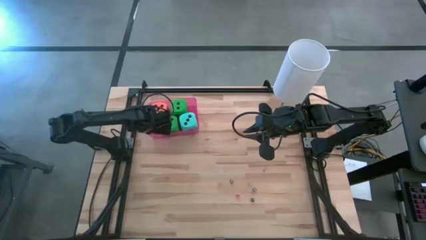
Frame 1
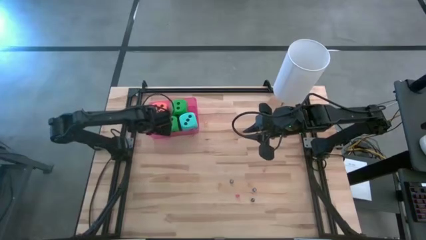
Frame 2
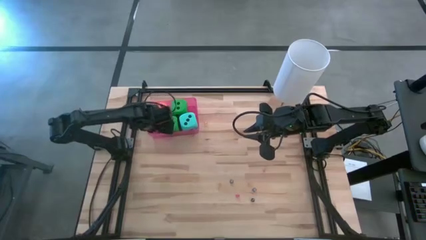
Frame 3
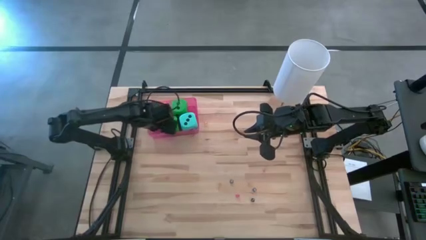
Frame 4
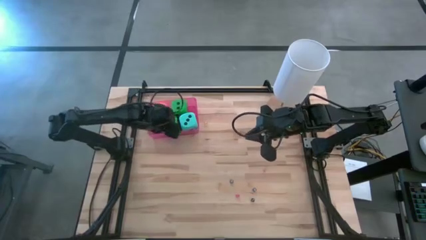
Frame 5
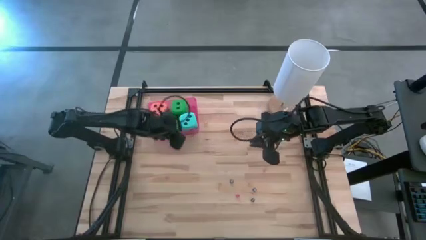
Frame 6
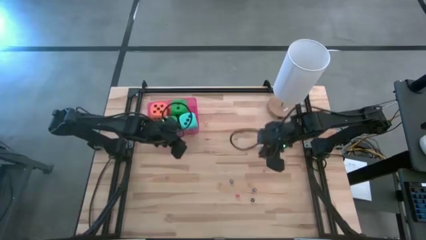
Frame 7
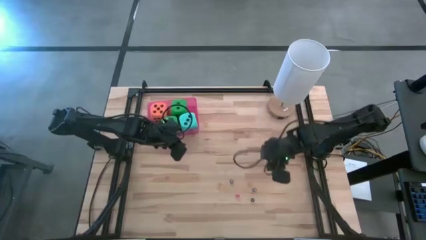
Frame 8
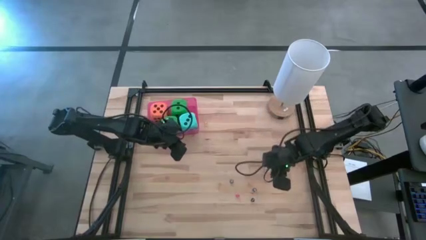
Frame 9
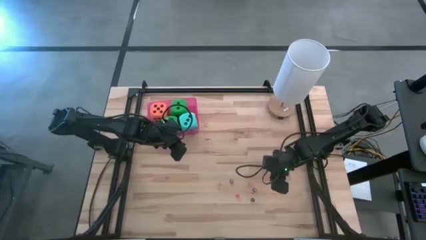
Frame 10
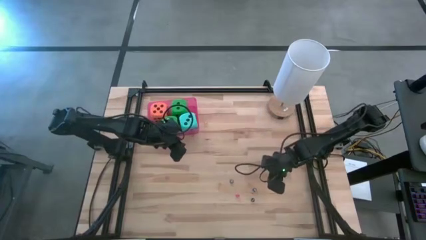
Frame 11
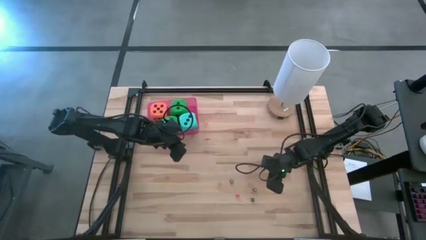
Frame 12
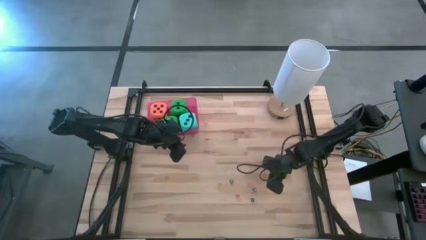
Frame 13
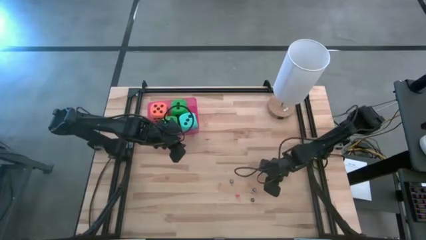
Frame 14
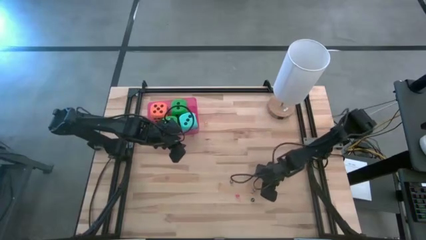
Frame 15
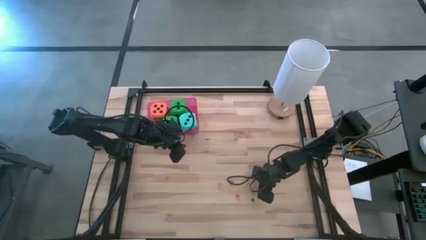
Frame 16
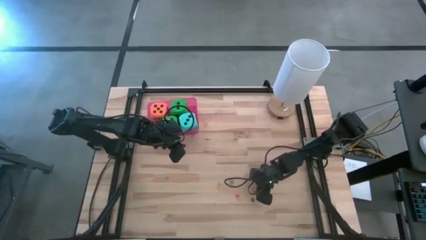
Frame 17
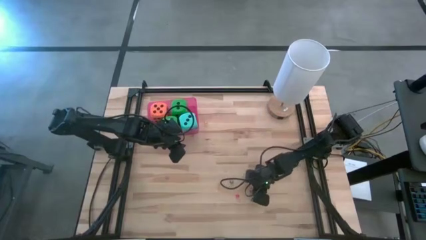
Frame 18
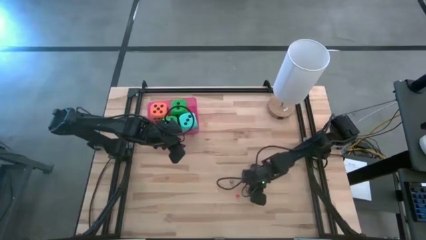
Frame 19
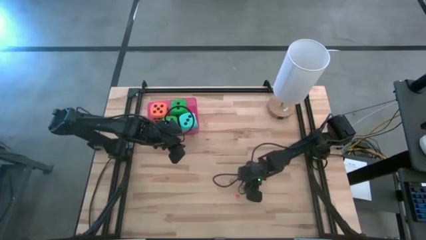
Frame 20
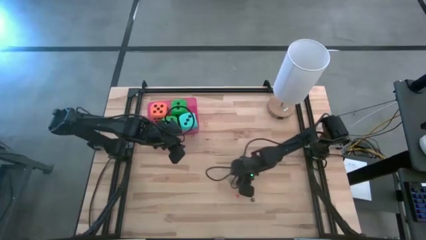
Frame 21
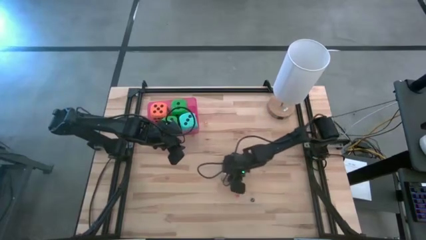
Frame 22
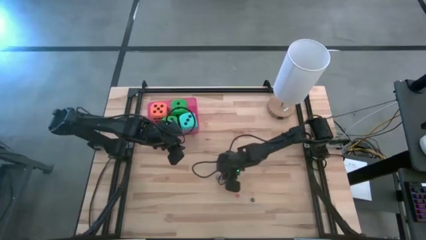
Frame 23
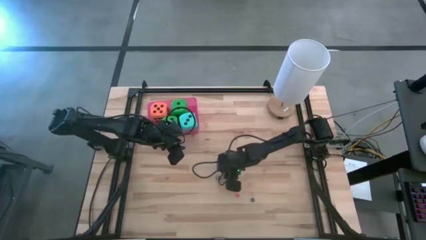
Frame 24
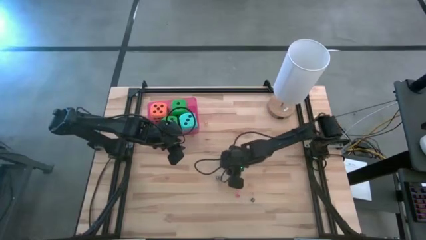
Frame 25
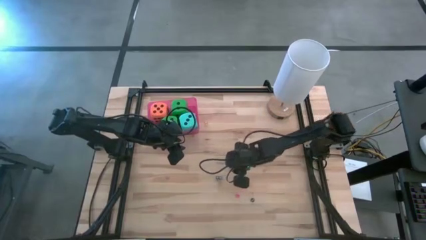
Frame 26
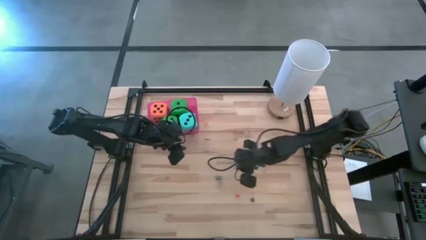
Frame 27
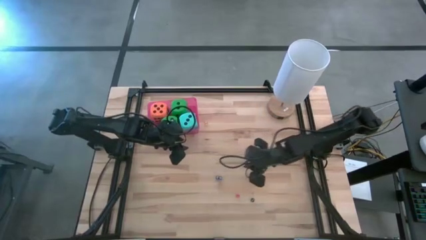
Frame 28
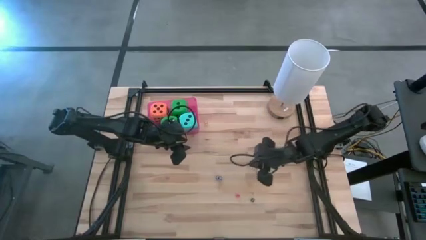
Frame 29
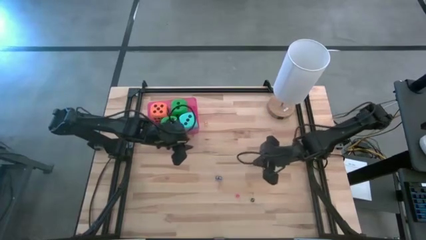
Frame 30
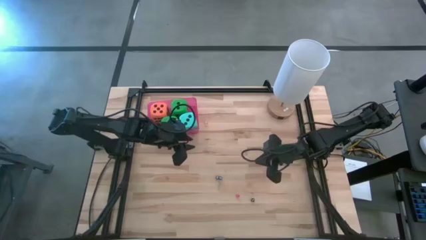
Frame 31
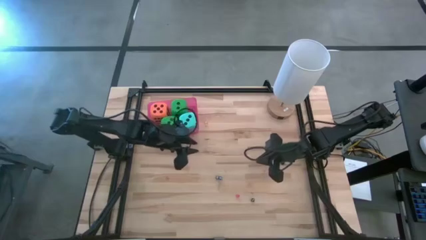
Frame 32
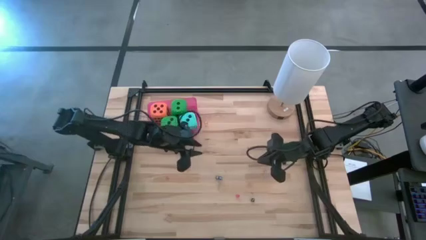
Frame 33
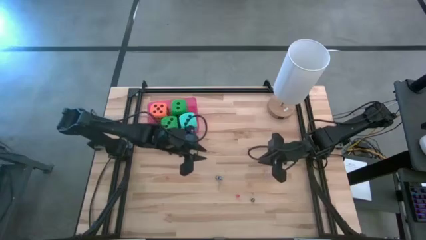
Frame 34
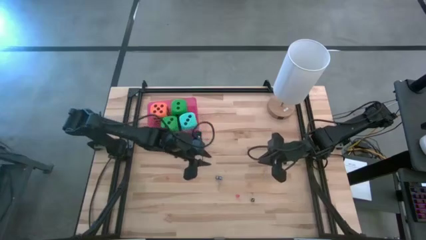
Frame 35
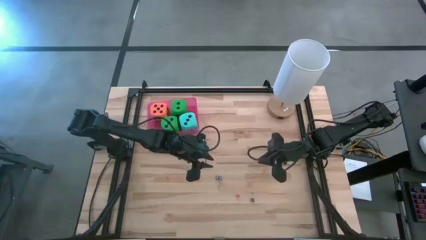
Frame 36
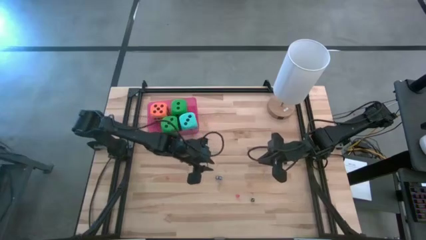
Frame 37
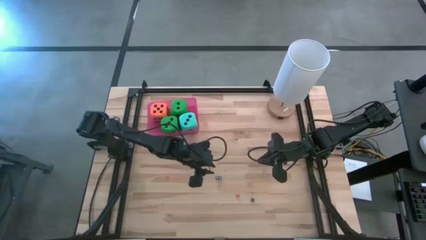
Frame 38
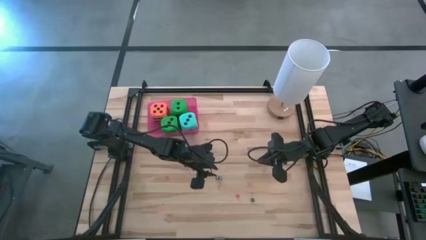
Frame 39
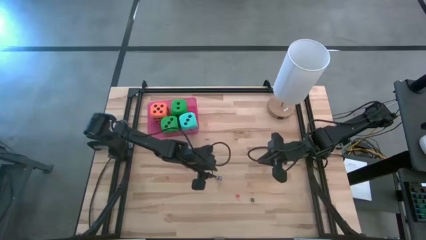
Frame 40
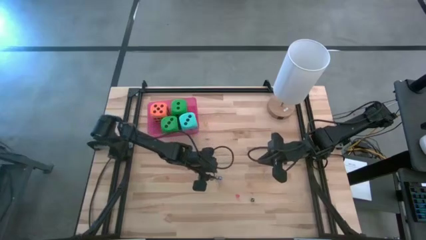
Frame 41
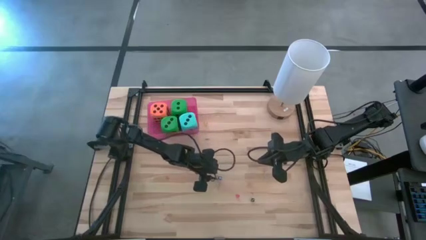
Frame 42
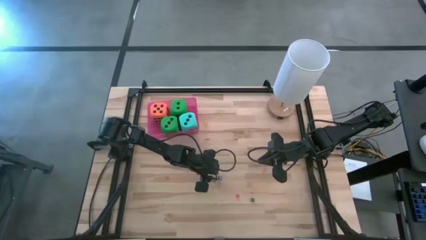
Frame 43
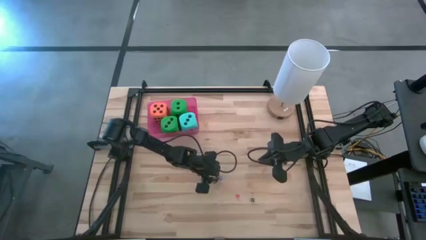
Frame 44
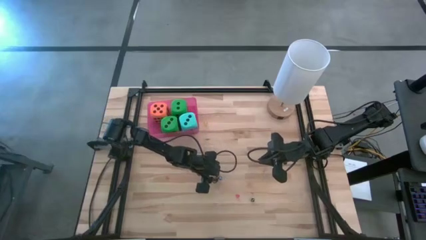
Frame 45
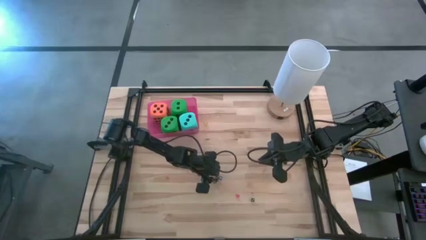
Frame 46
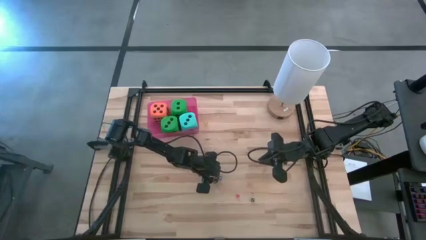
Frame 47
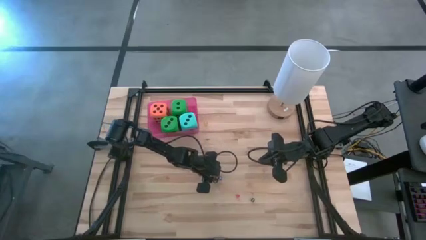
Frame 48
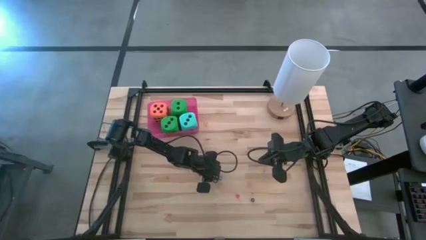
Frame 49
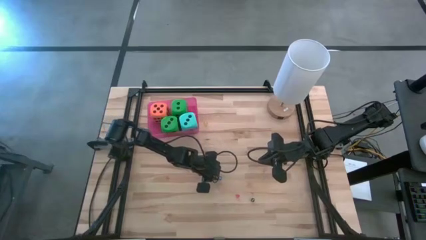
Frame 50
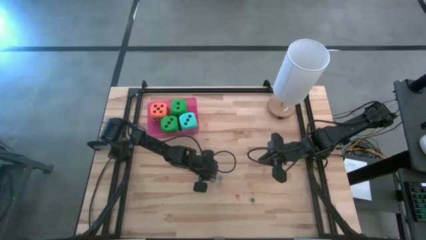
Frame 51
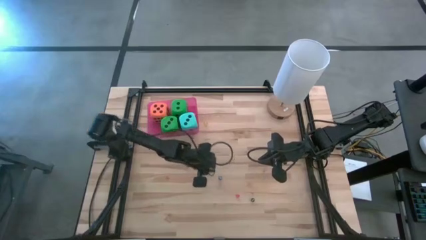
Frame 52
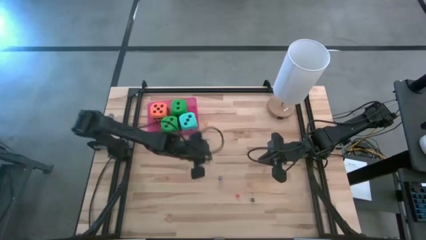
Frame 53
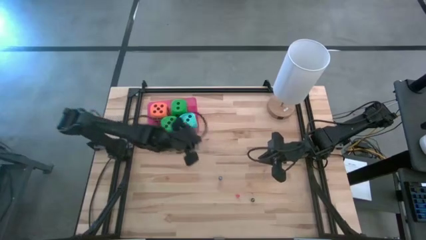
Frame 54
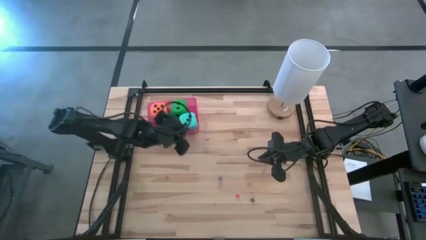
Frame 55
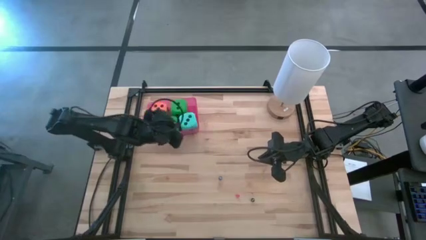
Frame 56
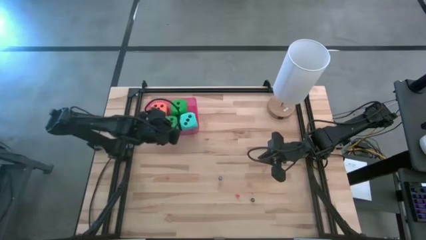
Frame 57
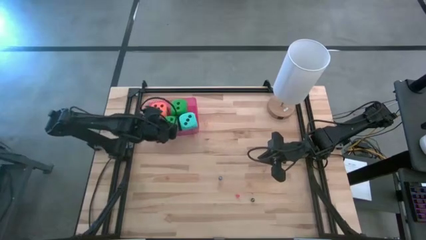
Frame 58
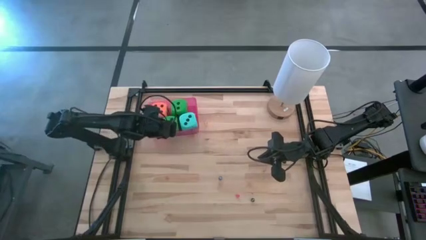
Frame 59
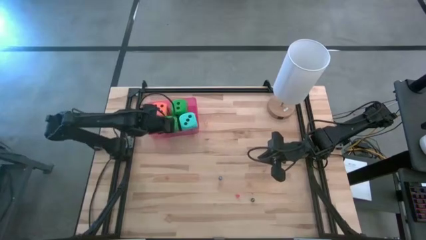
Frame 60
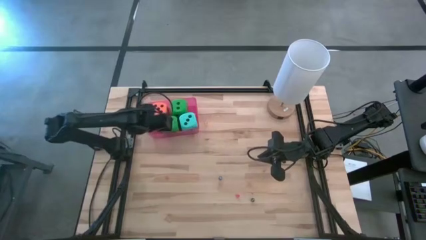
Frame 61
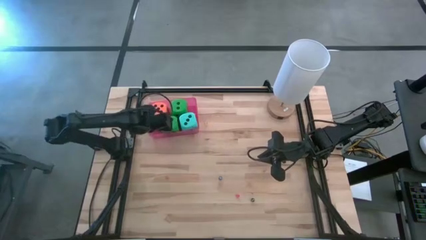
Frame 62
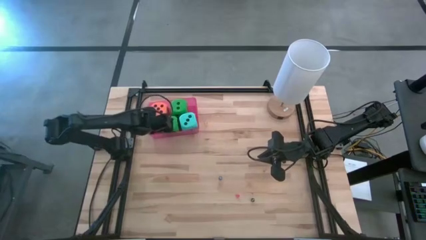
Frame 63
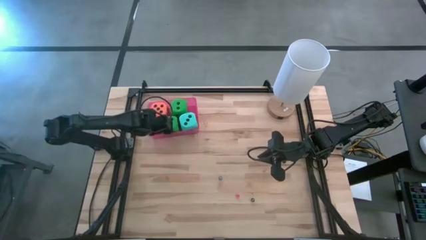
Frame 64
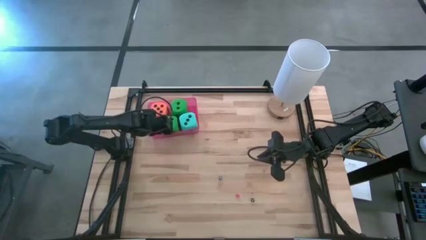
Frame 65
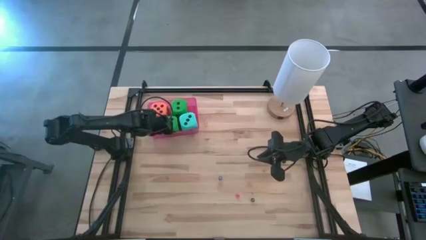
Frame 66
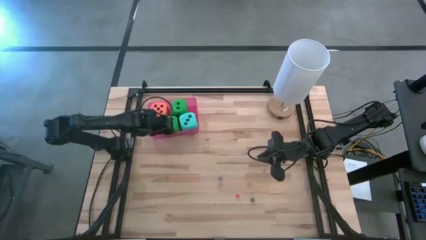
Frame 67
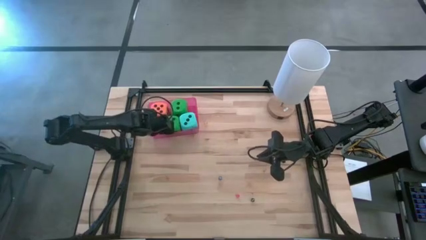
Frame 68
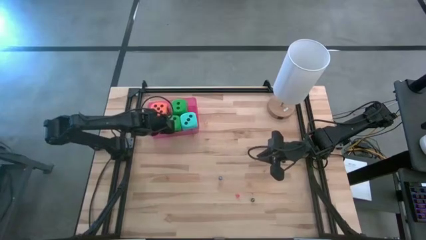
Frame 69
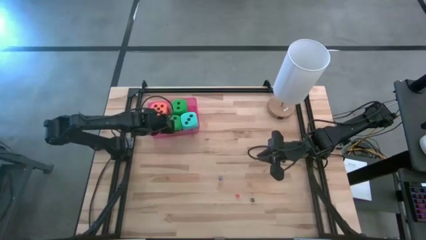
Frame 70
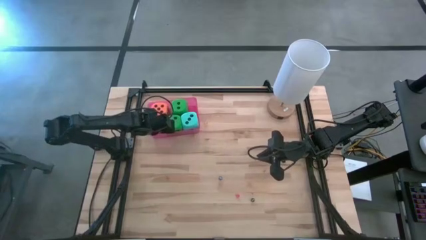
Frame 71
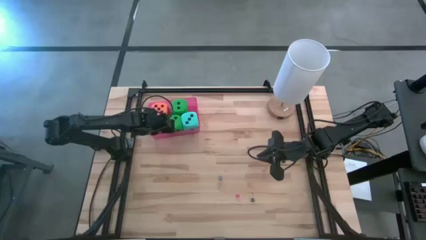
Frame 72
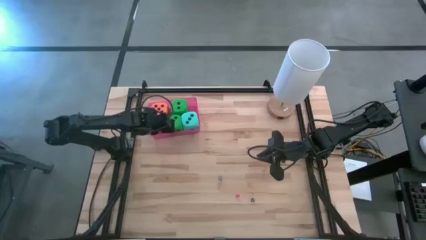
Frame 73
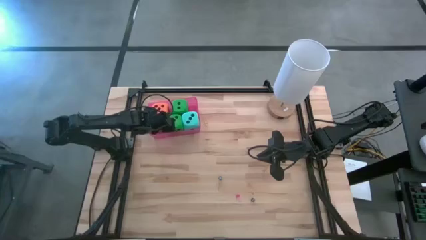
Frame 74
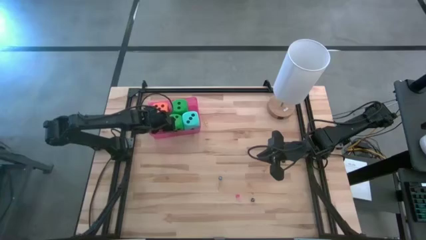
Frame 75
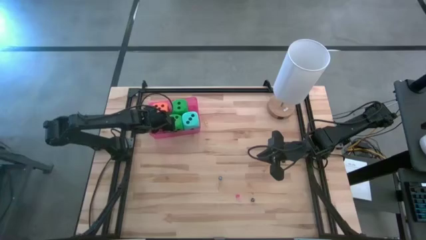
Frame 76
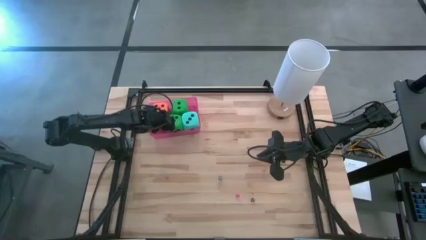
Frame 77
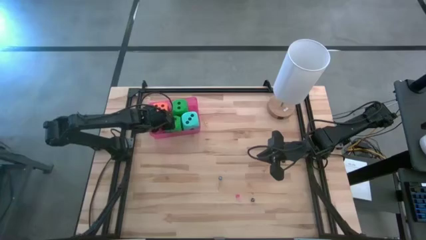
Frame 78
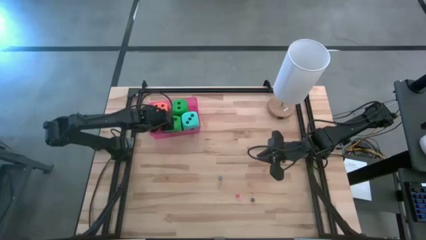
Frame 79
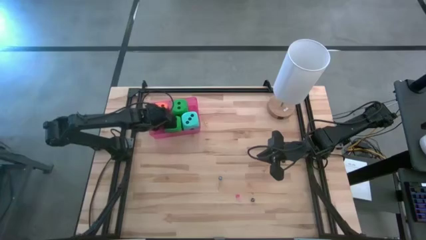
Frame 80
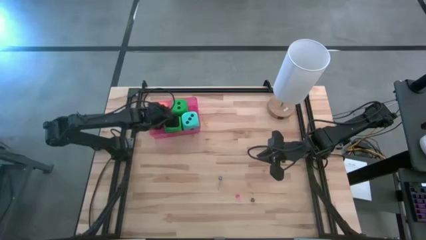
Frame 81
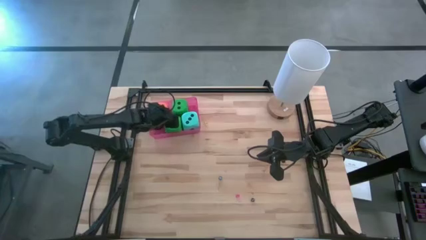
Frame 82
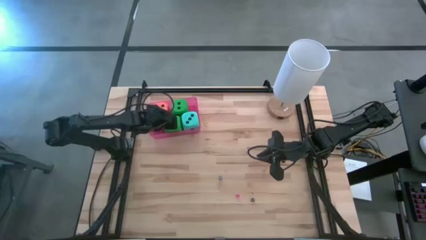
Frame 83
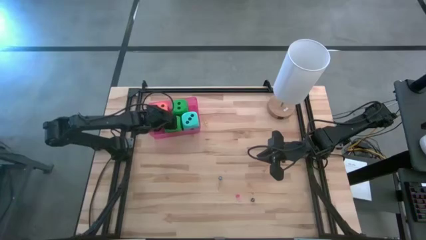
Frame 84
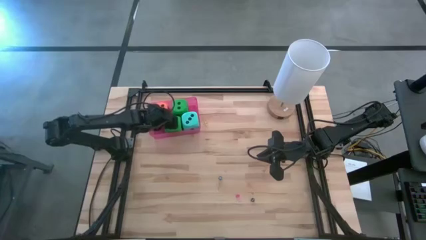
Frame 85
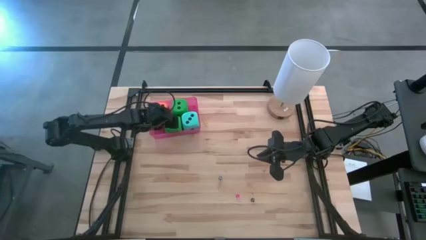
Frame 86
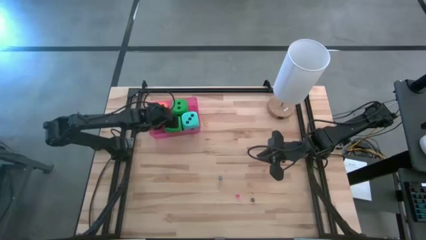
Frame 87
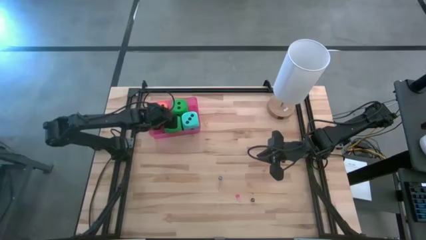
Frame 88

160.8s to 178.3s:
Task: Pick & Place Dice
Put the left small black dice into the red bin
